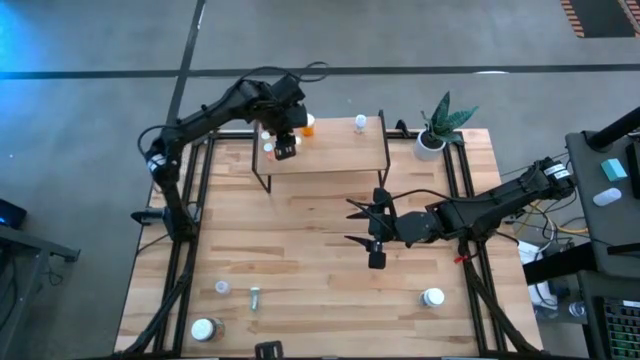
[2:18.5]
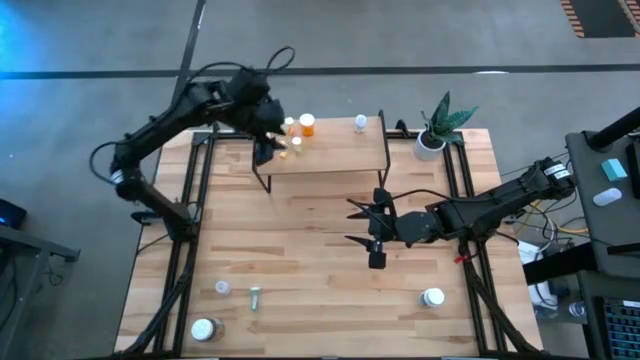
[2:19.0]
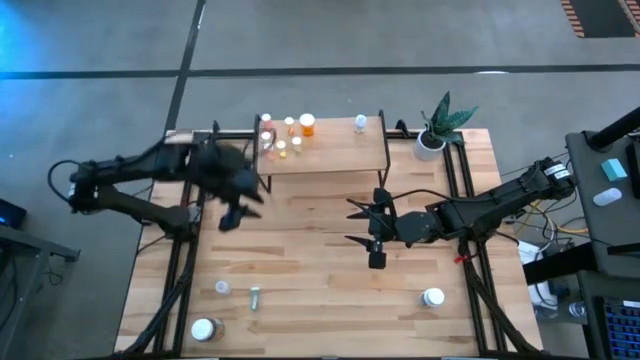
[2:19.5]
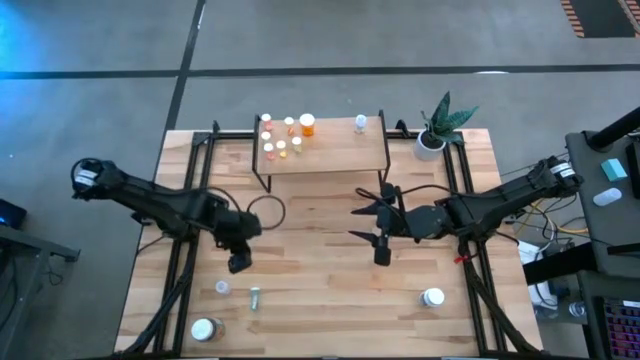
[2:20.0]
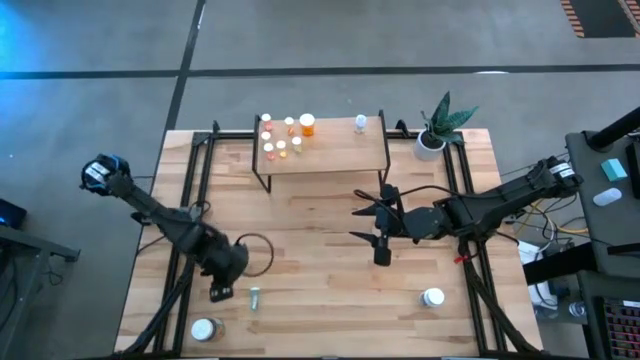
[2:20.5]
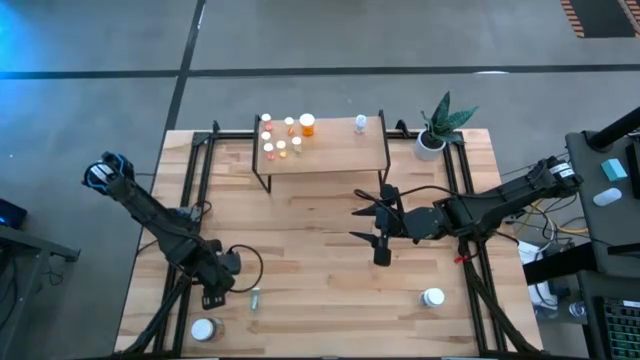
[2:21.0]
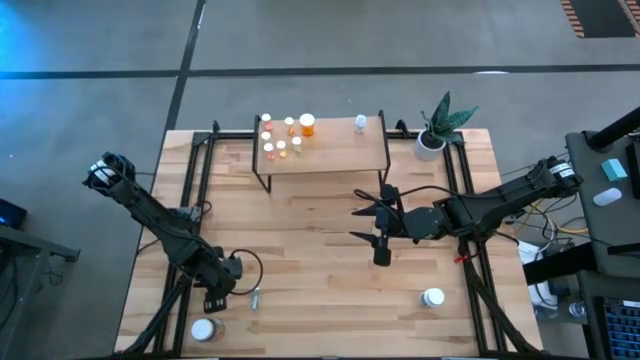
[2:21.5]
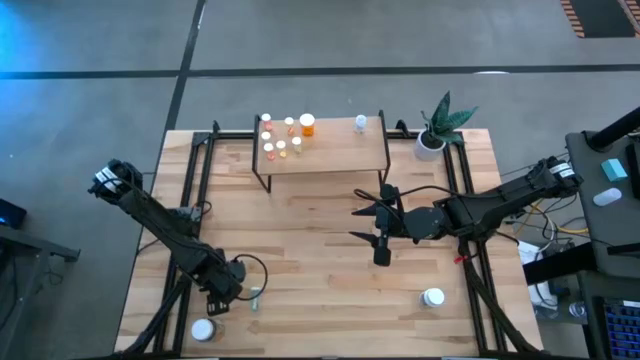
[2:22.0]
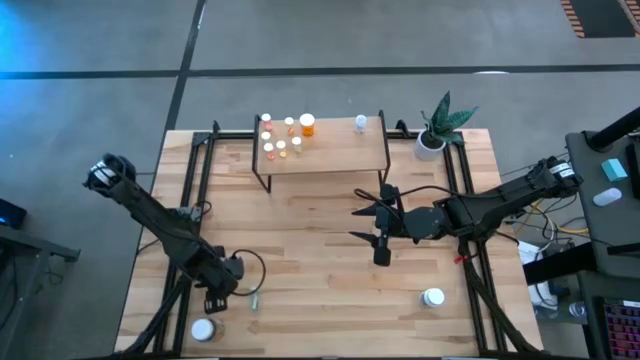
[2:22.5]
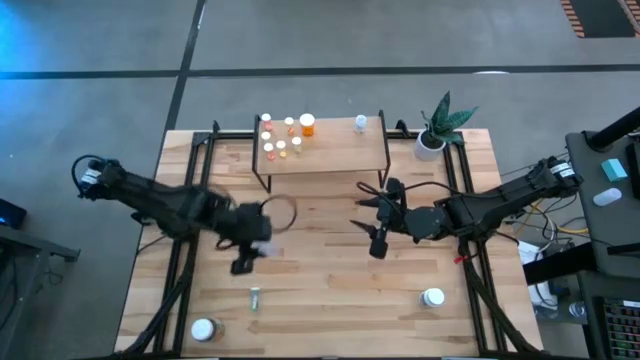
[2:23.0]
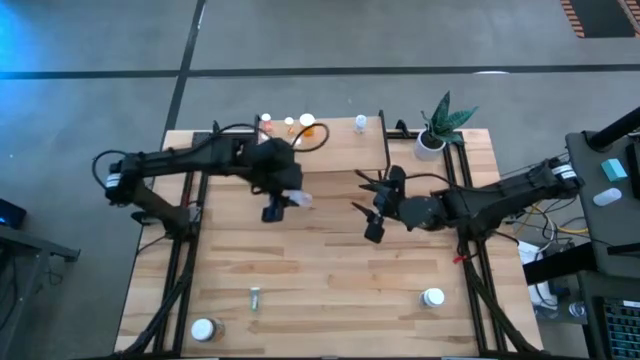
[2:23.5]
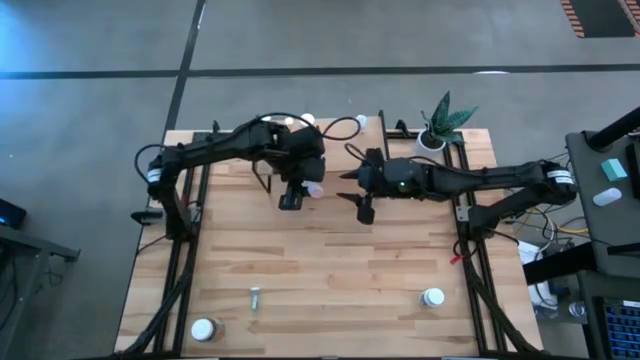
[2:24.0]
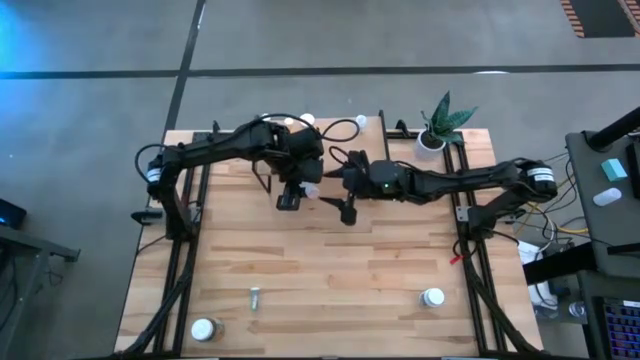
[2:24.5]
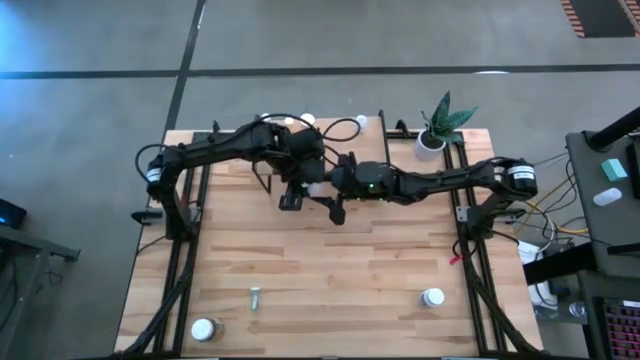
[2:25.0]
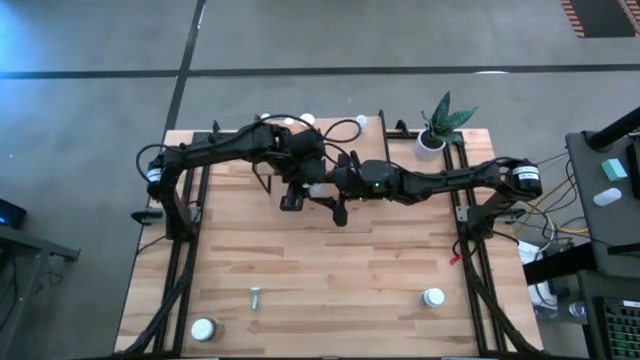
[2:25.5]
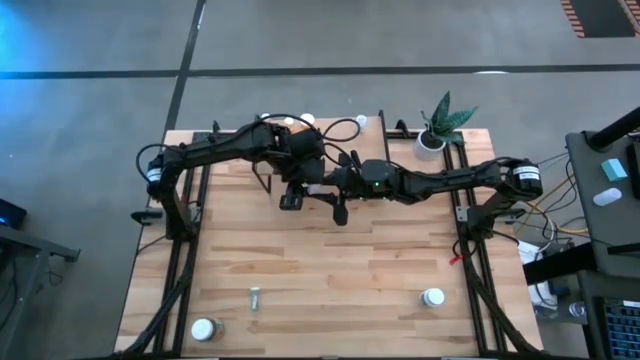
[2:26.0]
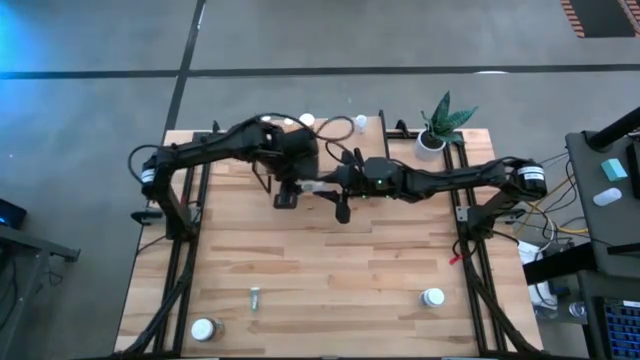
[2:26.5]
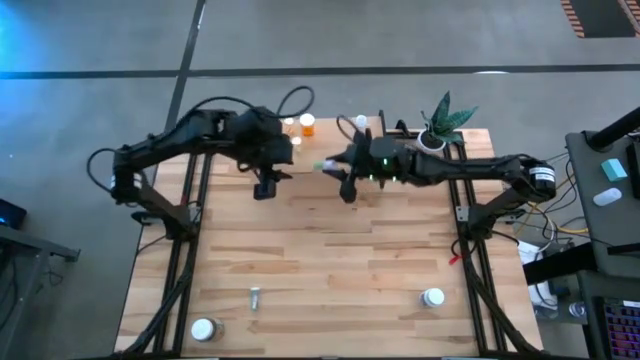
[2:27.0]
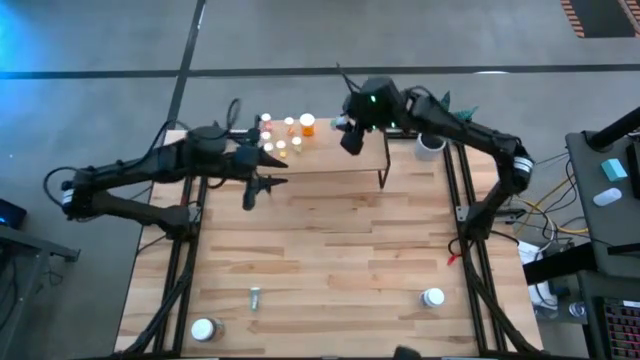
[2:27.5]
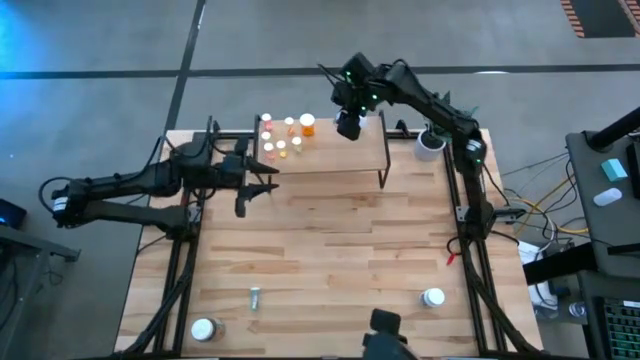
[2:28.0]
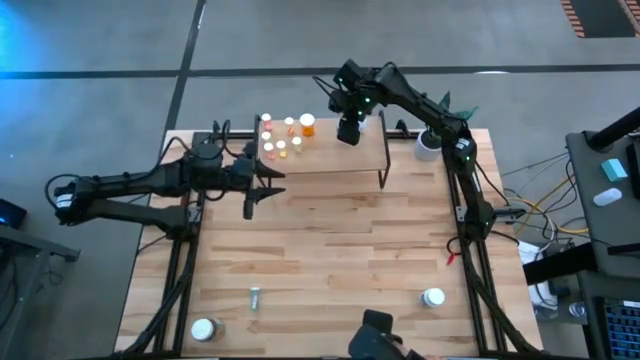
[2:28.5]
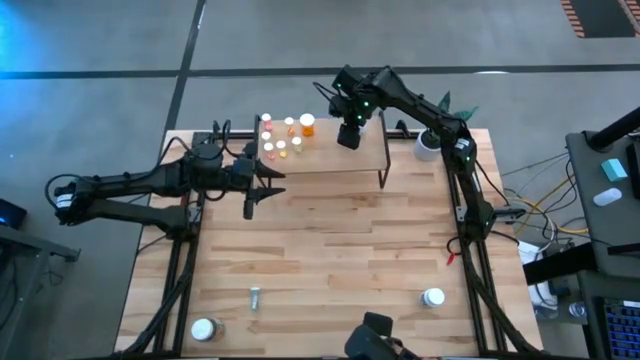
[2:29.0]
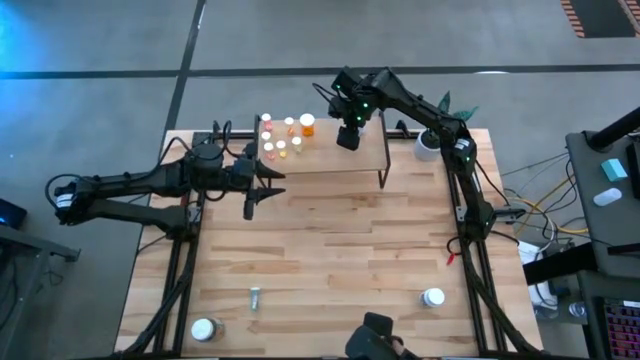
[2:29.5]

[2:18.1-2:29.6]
Task: Pick and place medicine bottles onto shelf by color
Put the transparent pill bottle on the shelf

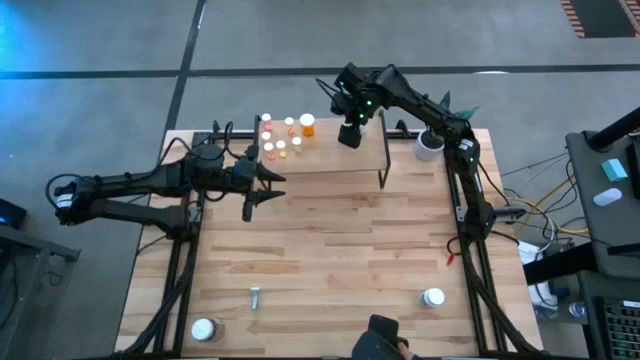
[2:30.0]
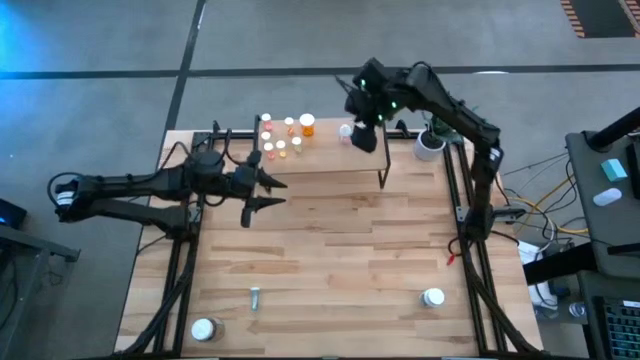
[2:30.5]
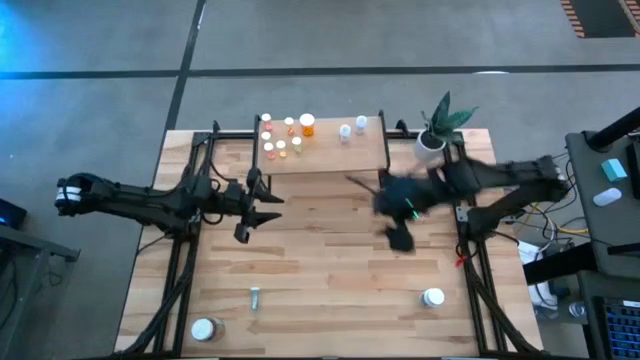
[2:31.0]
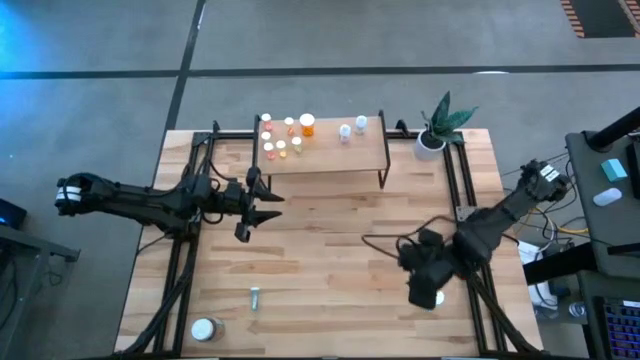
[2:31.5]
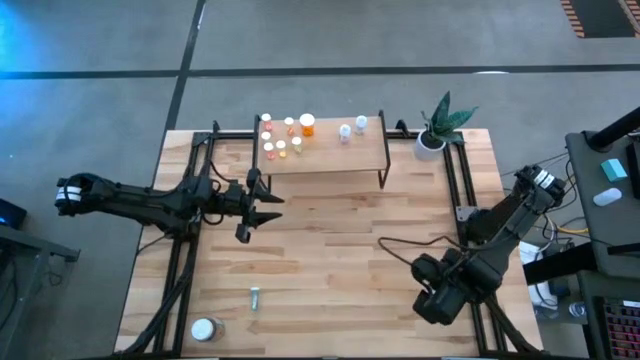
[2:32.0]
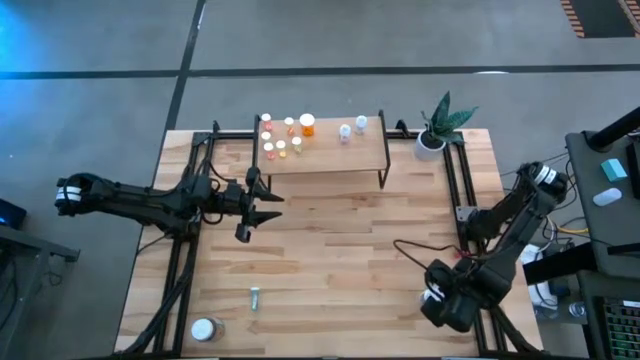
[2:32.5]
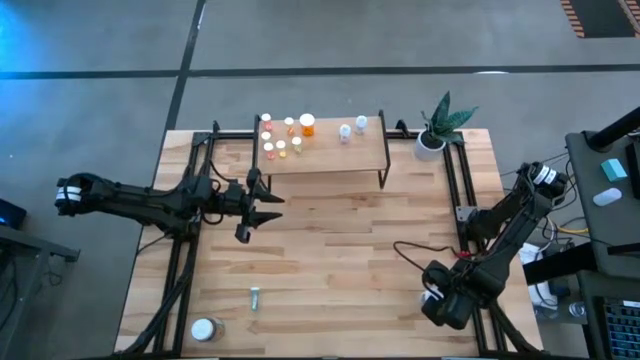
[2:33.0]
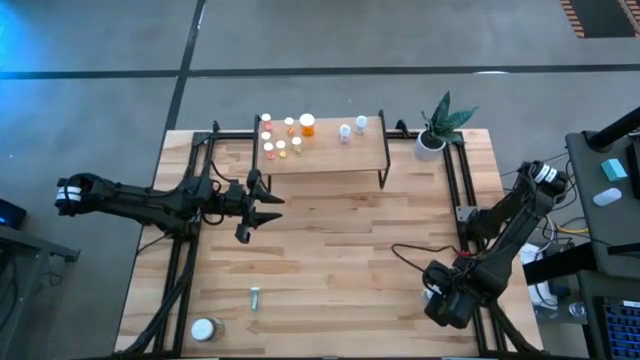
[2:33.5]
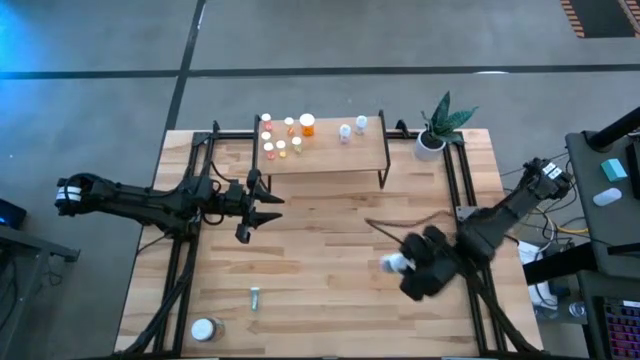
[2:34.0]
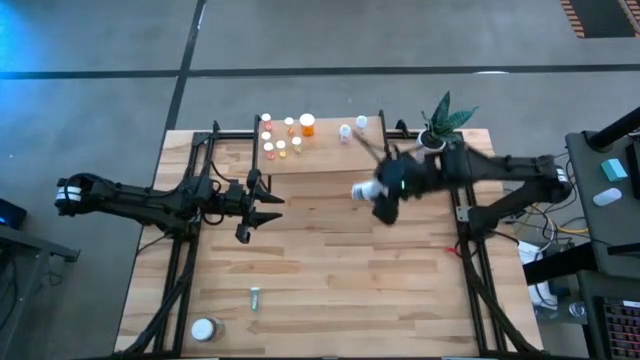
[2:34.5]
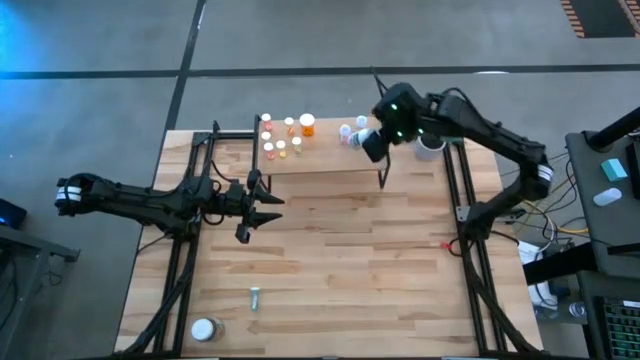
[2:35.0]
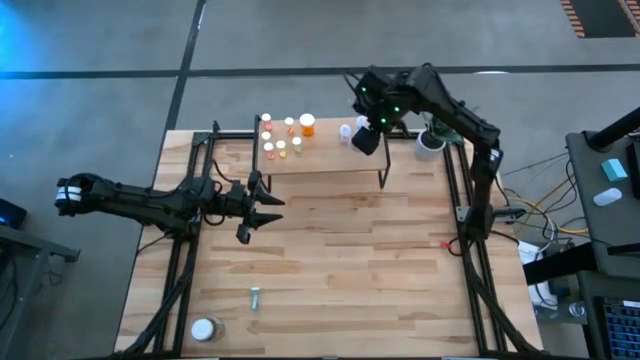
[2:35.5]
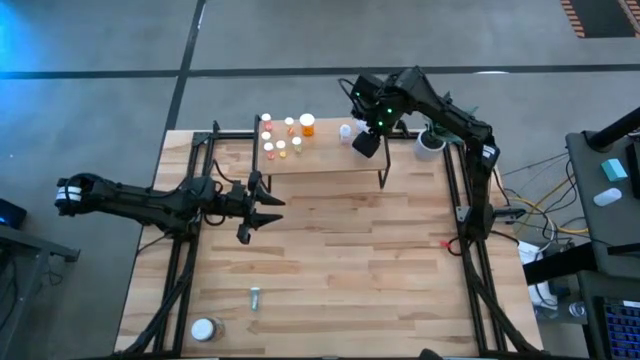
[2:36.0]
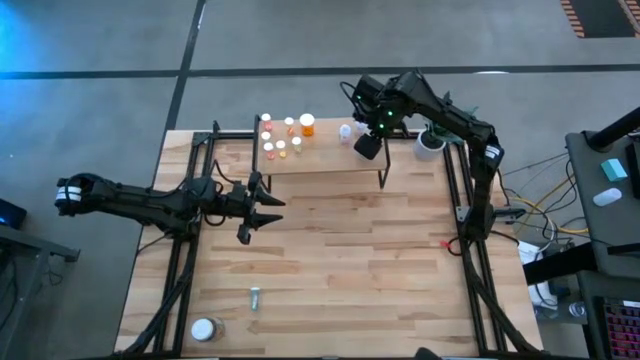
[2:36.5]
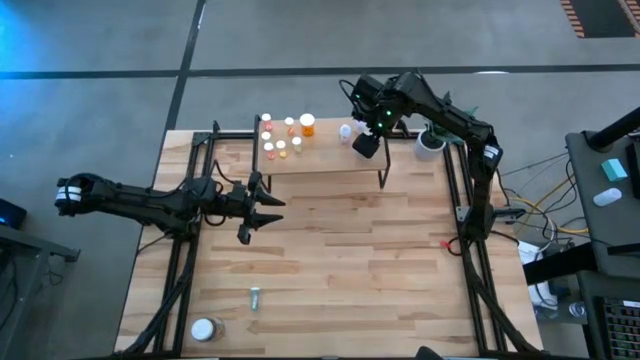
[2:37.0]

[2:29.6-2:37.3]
Put the white pill bottle on the shelf
